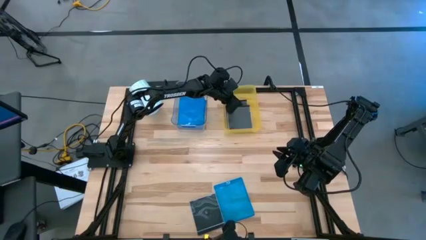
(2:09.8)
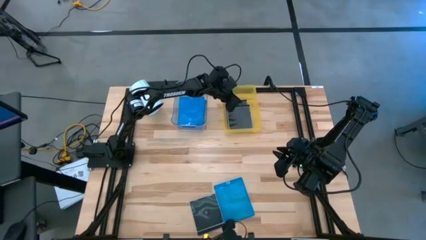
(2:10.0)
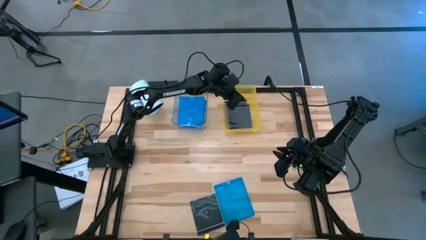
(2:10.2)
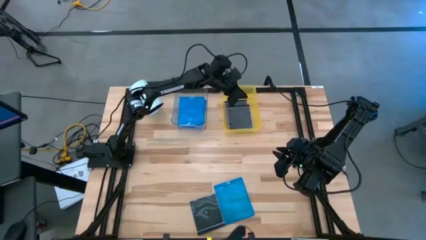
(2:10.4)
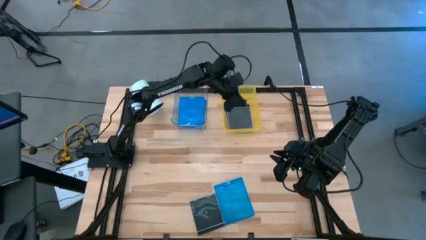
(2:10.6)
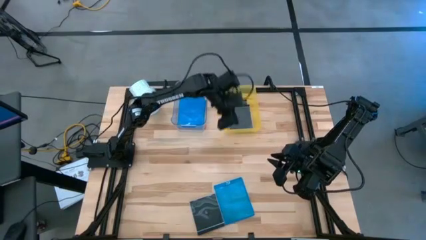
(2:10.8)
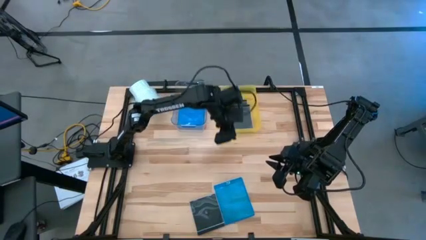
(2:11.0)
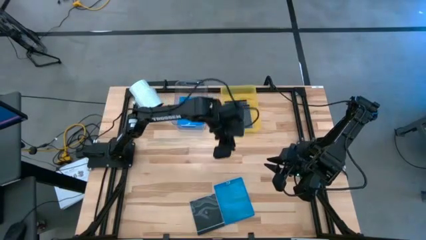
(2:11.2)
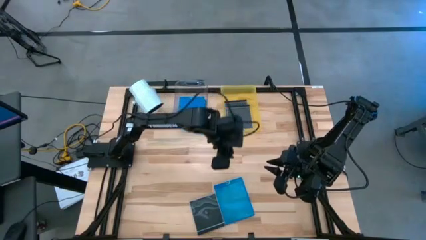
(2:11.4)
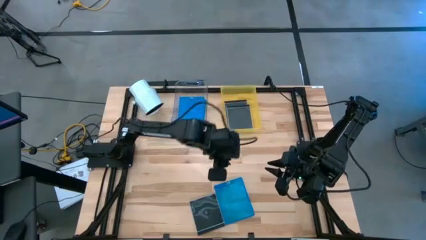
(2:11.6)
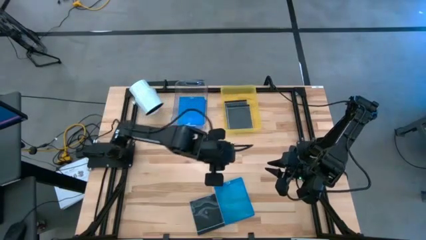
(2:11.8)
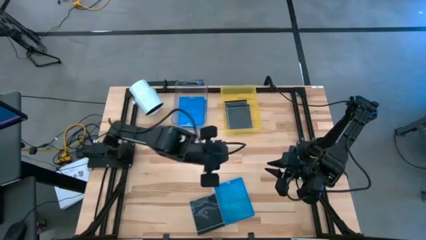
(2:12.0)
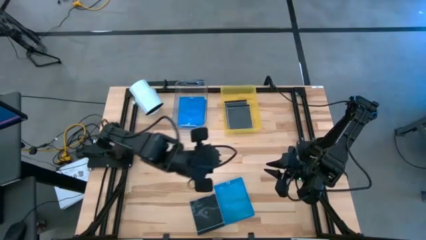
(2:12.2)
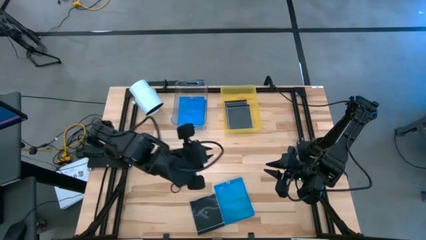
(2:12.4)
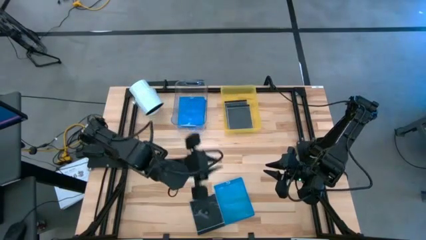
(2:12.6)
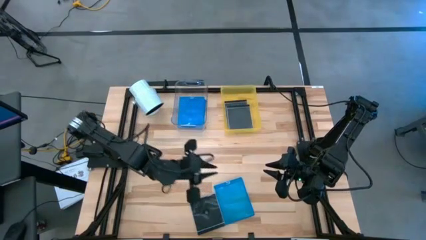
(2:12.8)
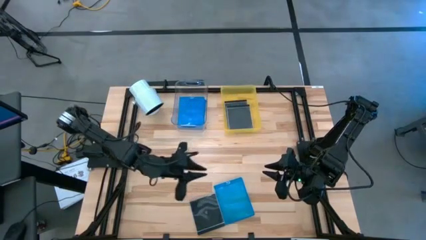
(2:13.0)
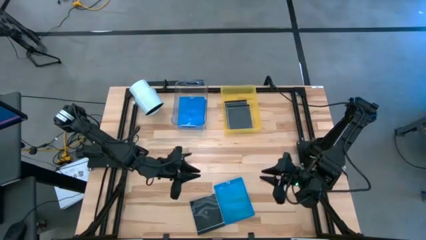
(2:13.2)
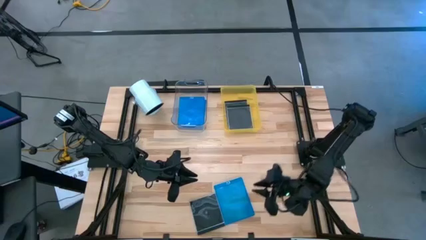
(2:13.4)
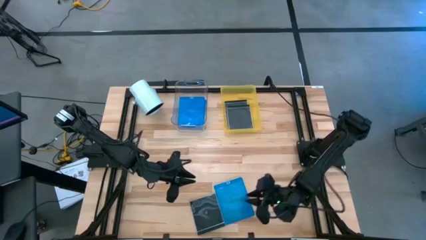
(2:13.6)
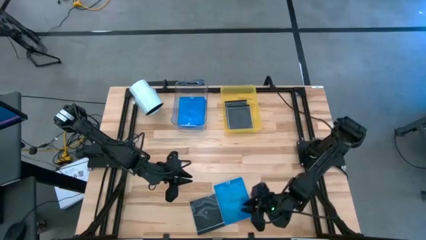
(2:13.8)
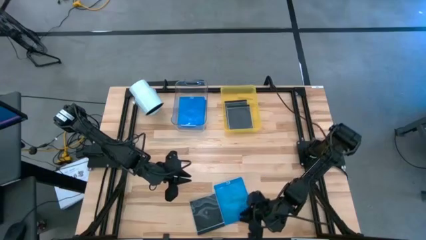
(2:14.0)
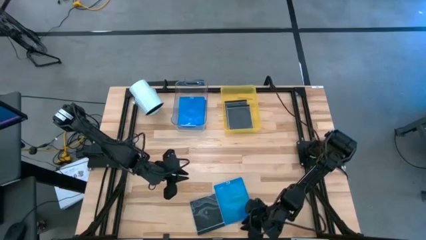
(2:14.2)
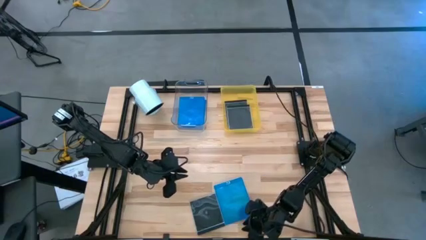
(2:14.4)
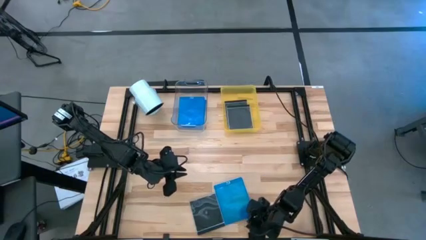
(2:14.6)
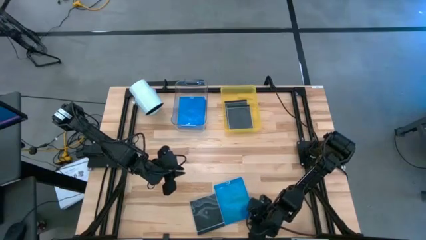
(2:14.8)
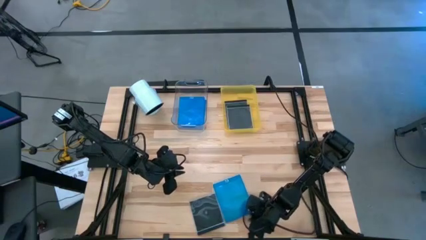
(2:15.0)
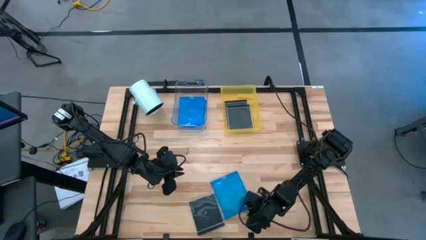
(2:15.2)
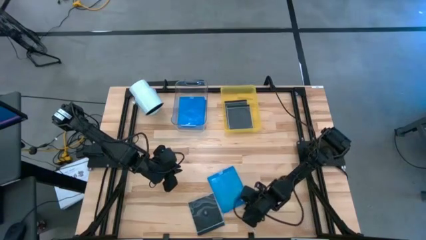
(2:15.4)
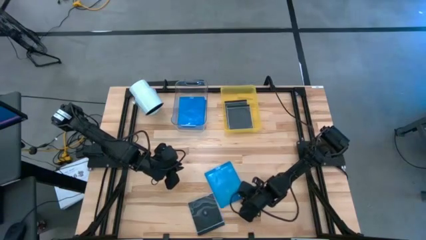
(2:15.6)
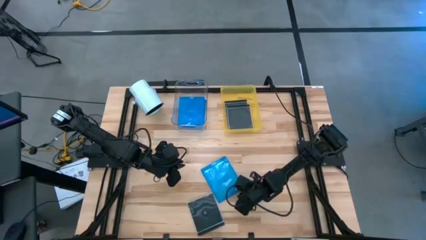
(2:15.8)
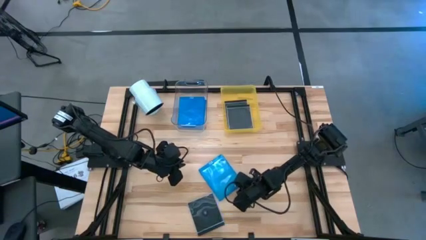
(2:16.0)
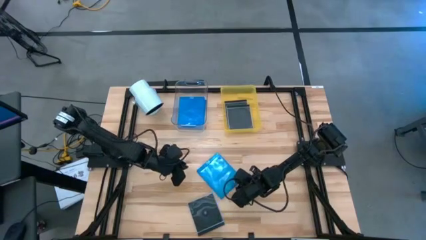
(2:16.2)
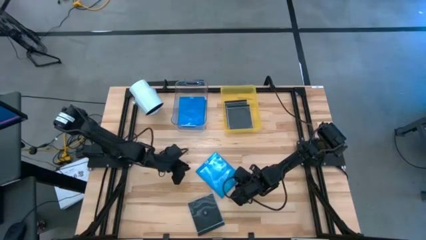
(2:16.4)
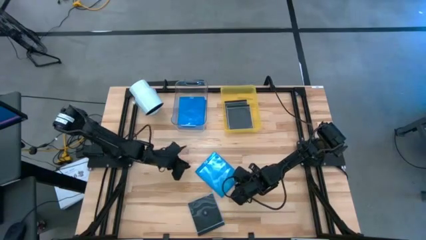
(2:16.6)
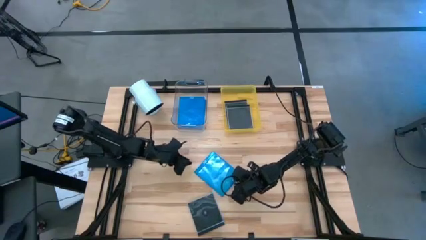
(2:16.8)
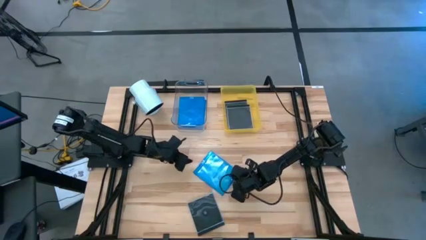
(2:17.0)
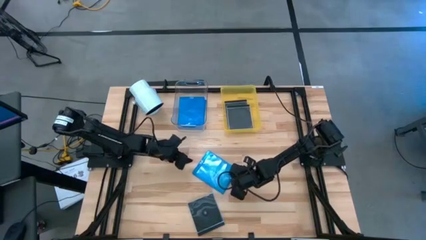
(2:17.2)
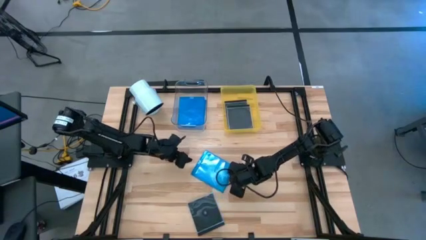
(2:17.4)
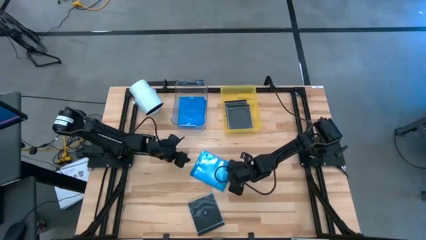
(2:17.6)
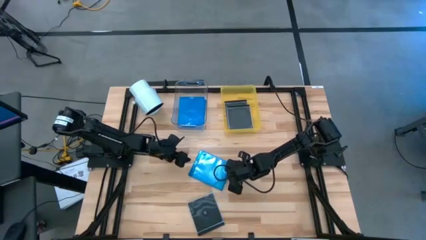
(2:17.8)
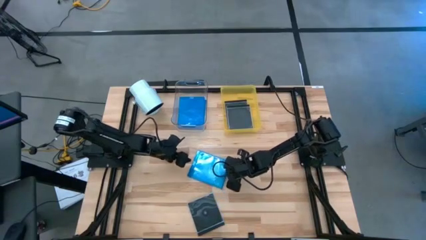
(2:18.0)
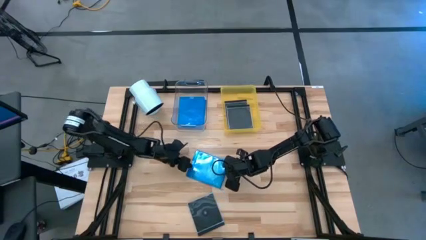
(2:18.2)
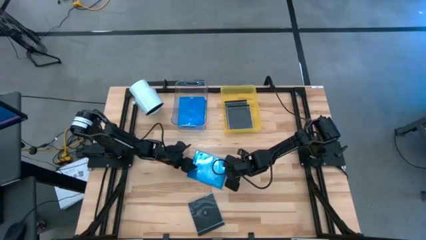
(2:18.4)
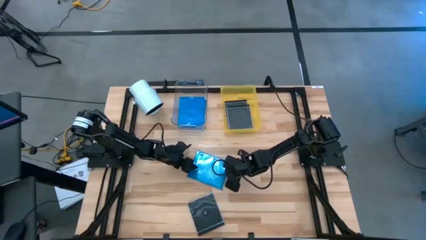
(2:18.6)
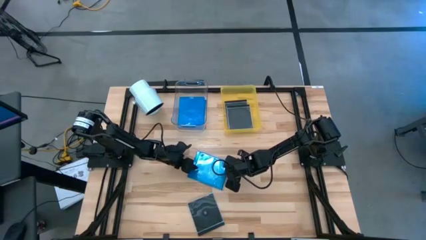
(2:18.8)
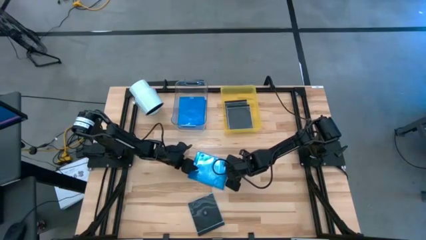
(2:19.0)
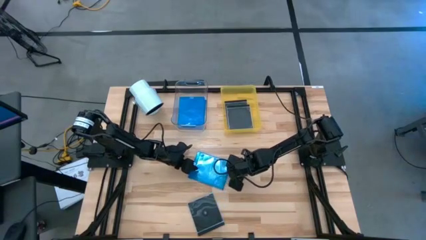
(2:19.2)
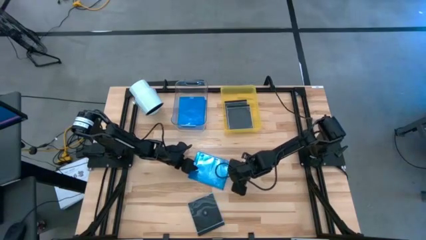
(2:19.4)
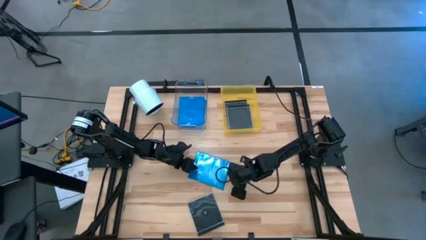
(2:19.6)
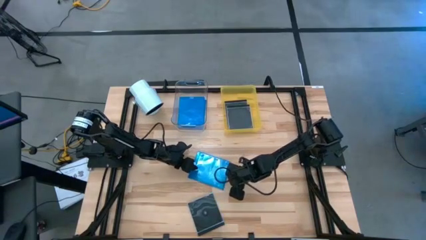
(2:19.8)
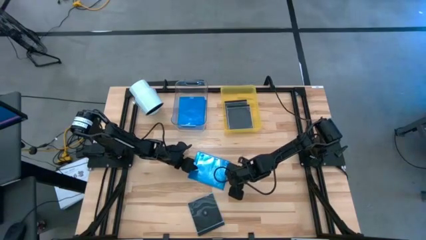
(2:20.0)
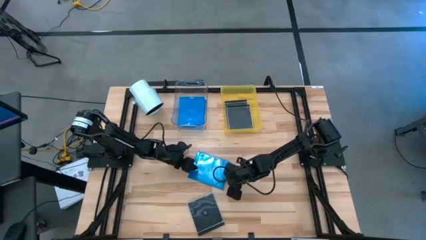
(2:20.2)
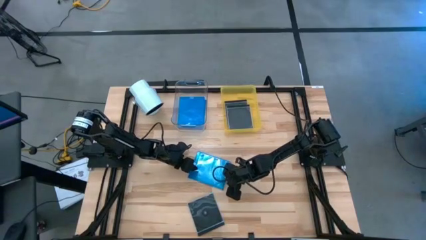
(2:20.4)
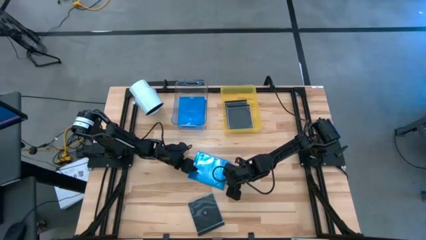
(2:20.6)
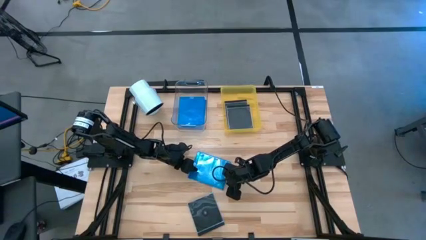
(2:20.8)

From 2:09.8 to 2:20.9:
Task: Pick & place jewel cases by type
Put the blue CD case into the transparent bin

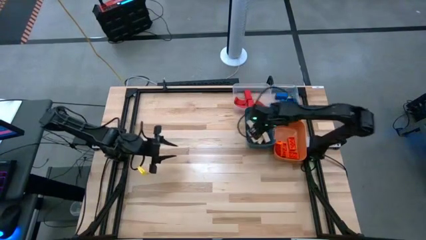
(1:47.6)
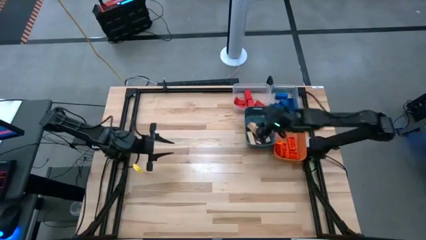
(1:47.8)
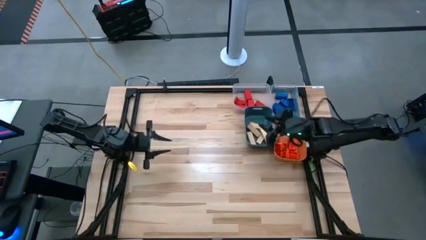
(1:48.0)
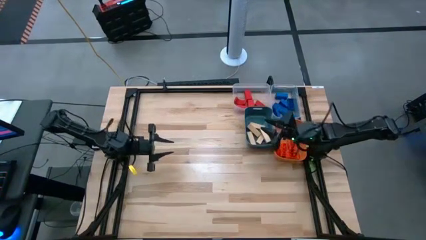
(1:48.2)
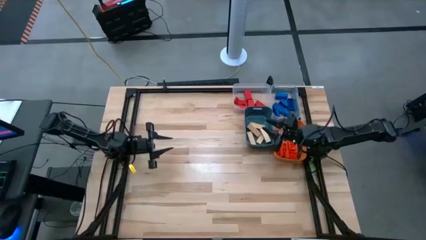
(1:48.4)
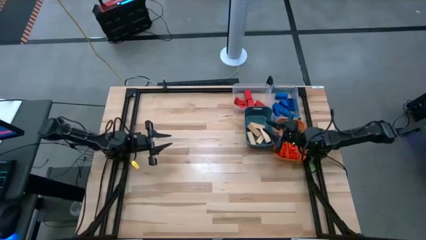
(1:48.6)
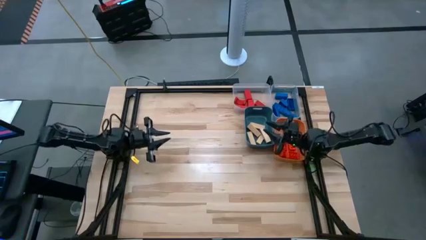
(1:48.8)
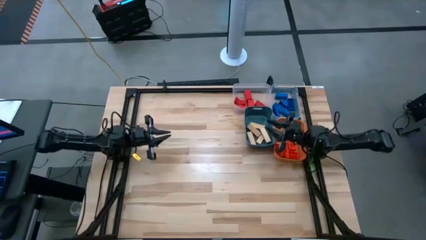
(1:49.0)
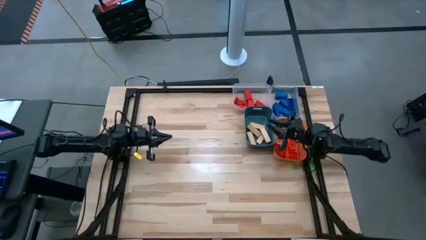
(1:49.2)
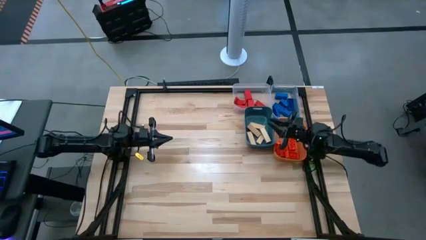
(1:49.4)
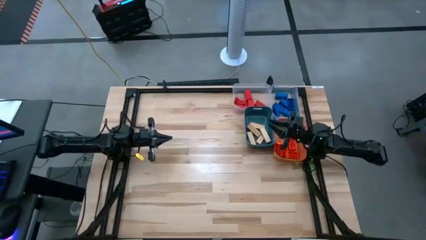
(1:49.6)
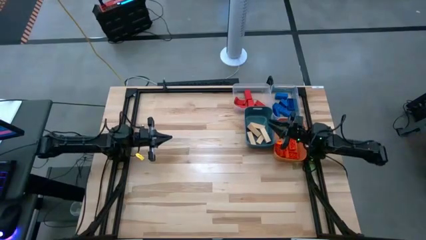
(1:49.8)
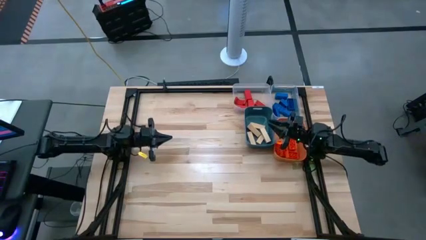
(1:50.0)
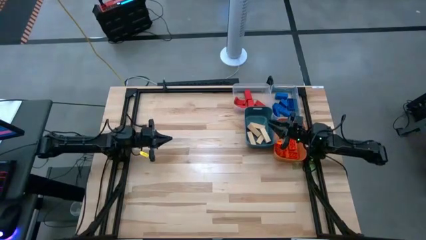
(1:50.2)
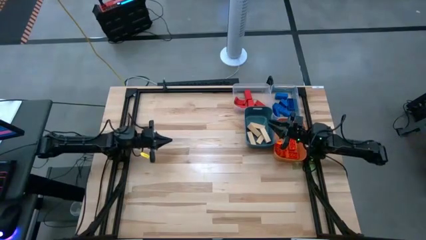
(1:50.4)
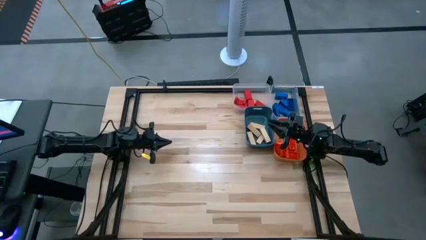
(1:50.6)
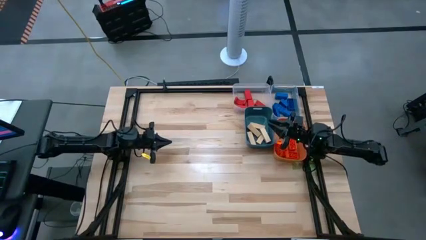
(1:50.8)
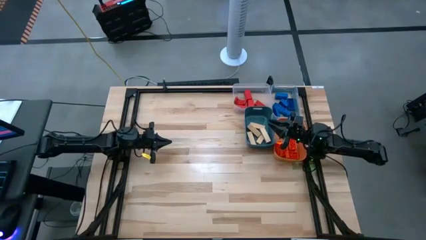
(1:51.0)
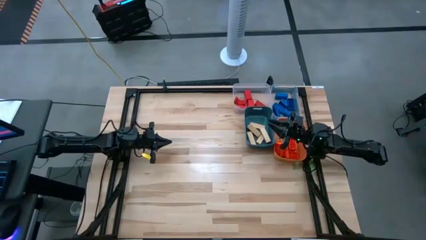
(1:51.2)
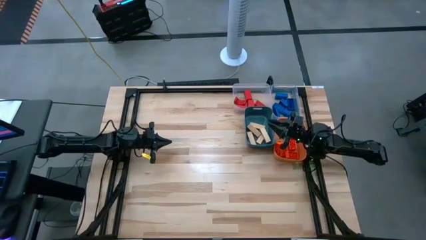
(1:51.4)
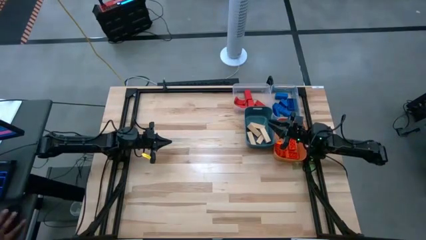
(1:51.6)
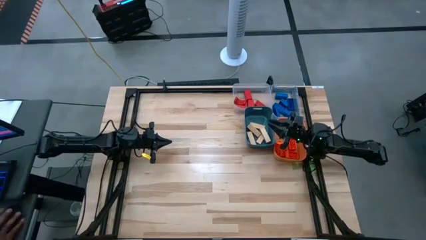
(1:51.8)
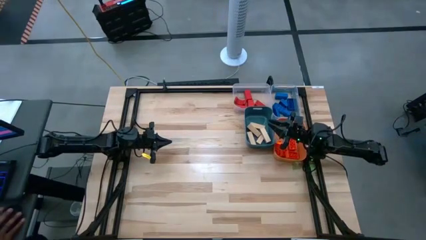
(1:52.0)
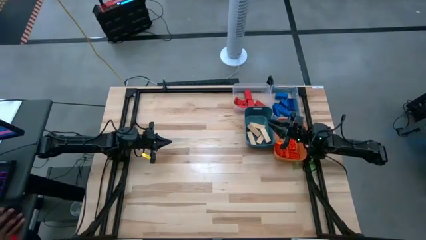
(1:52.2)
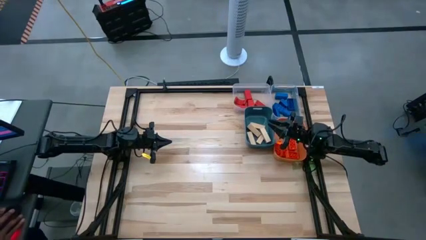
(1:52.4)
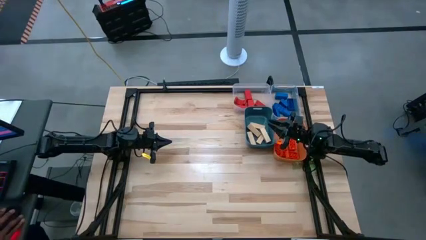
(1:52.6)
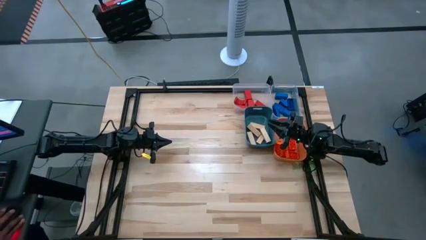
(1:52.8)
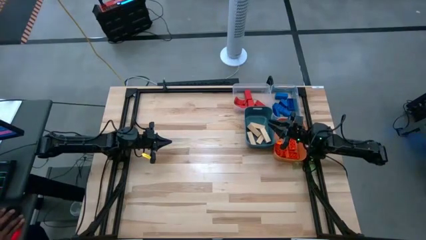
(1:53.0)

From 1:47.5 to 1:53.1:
Task: Sort blocks
Return to home position
